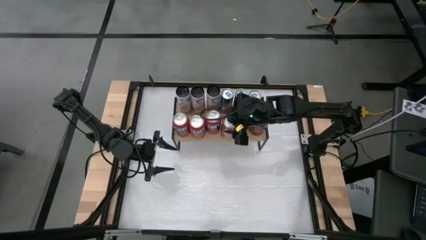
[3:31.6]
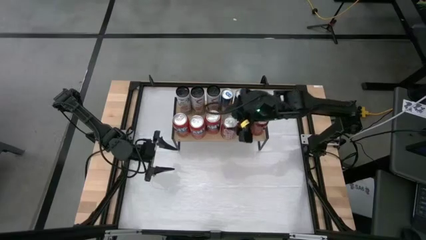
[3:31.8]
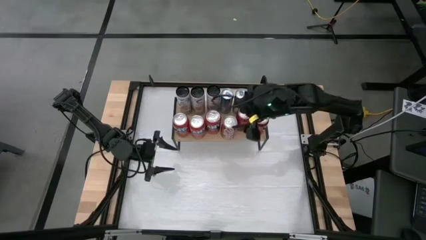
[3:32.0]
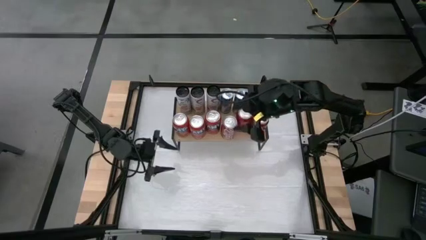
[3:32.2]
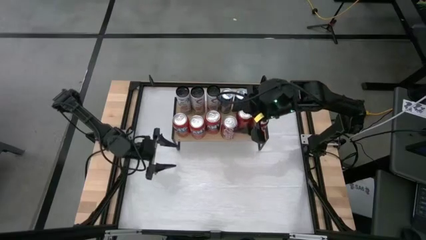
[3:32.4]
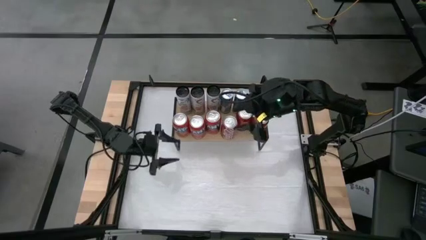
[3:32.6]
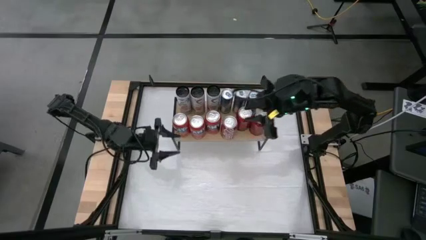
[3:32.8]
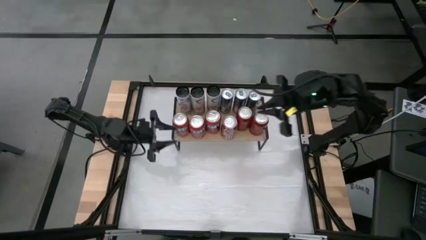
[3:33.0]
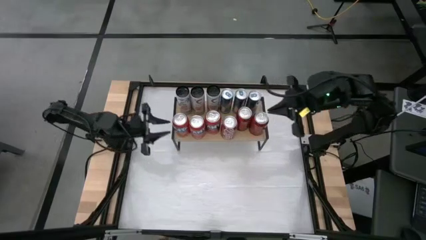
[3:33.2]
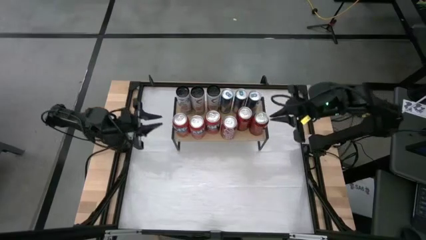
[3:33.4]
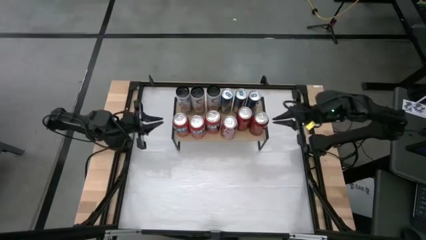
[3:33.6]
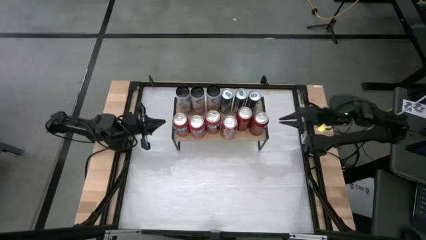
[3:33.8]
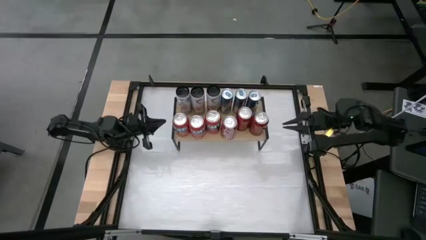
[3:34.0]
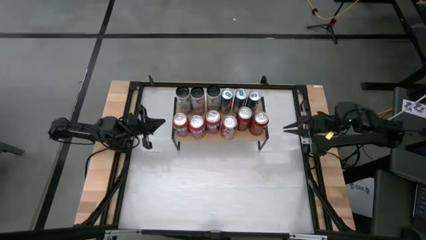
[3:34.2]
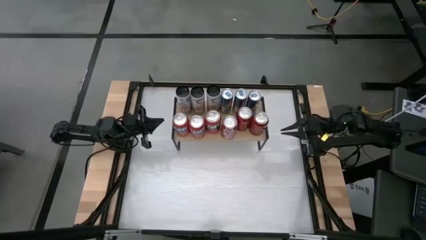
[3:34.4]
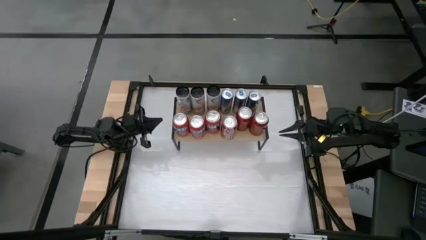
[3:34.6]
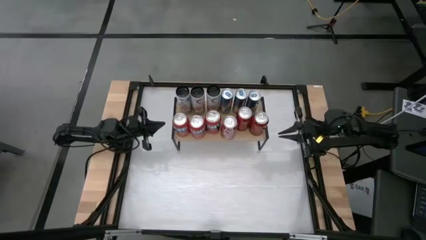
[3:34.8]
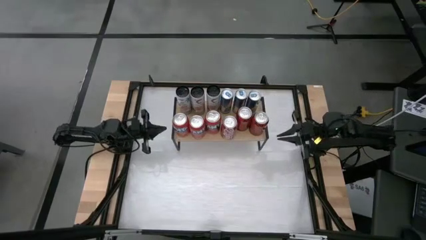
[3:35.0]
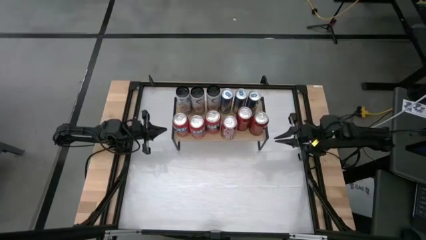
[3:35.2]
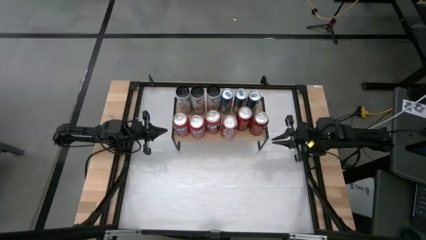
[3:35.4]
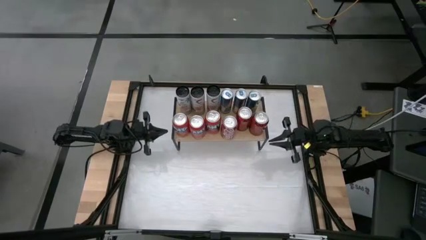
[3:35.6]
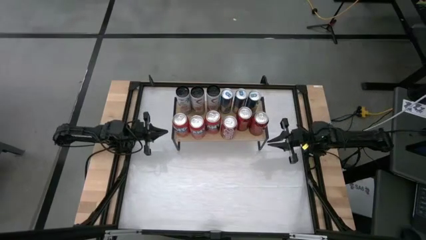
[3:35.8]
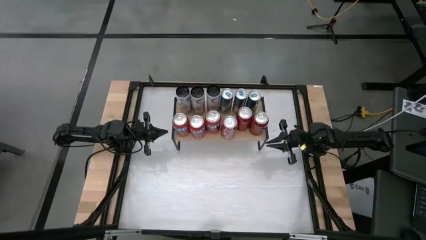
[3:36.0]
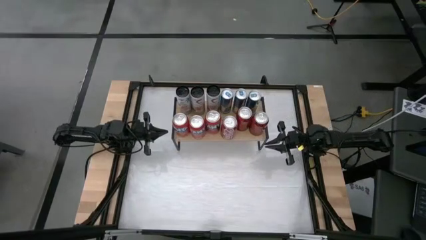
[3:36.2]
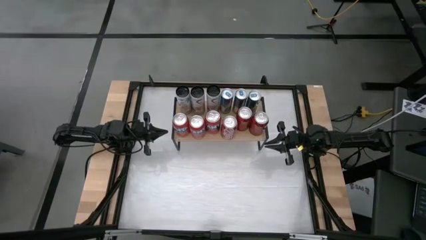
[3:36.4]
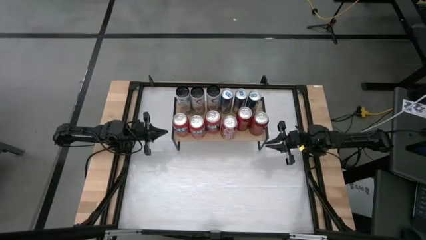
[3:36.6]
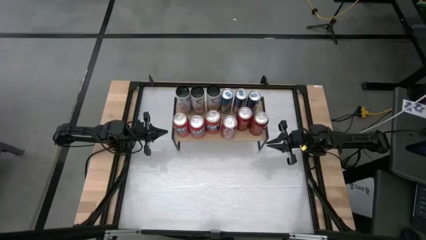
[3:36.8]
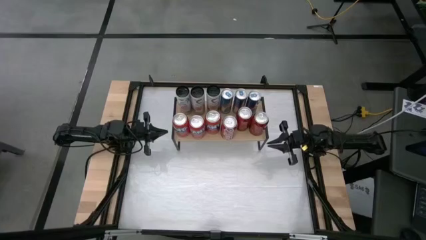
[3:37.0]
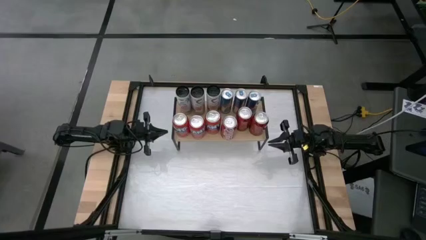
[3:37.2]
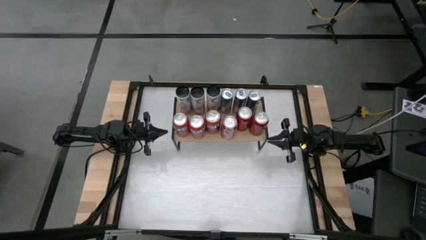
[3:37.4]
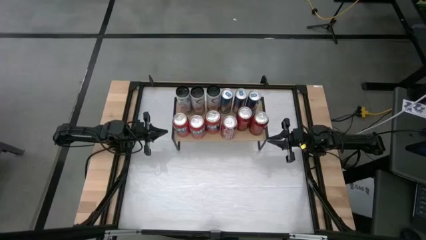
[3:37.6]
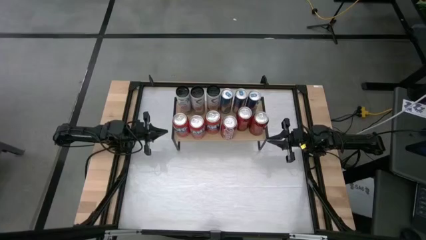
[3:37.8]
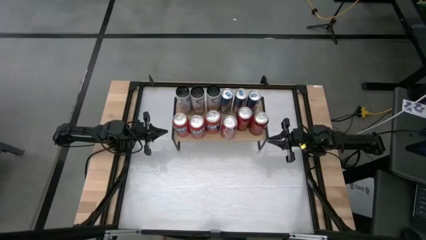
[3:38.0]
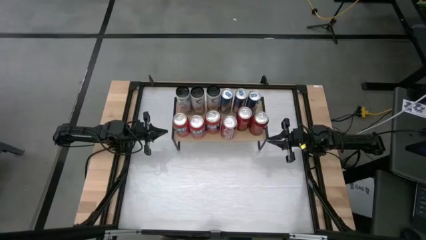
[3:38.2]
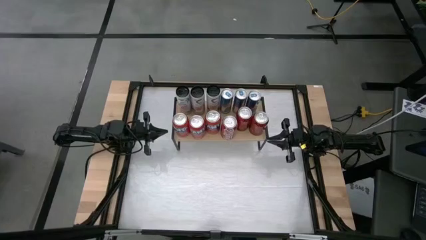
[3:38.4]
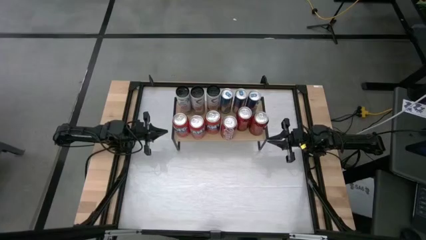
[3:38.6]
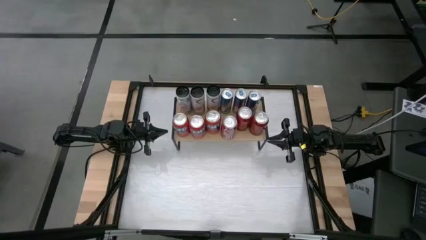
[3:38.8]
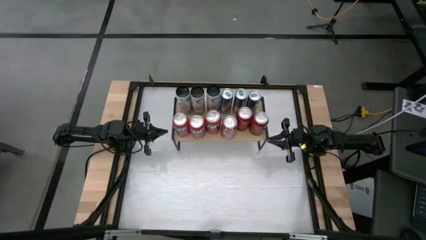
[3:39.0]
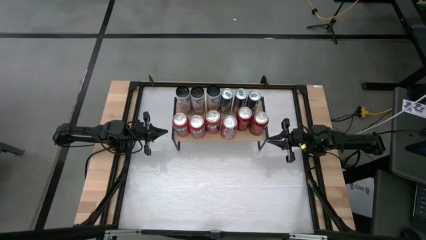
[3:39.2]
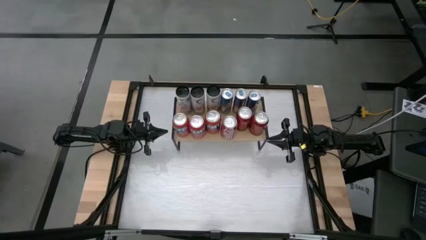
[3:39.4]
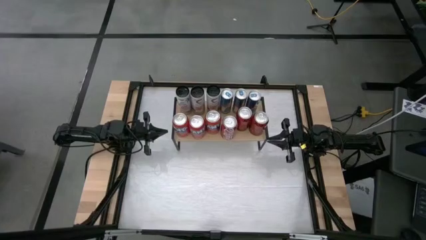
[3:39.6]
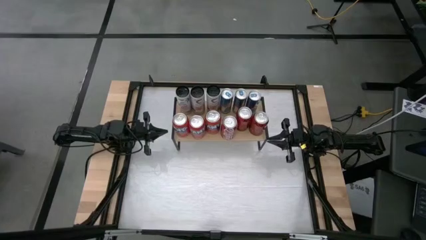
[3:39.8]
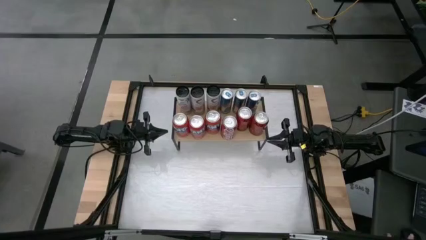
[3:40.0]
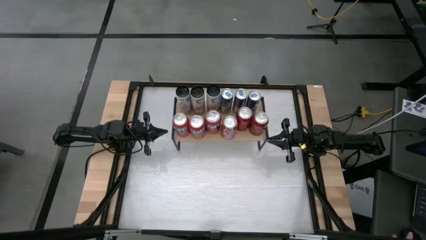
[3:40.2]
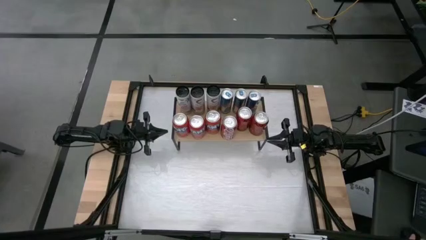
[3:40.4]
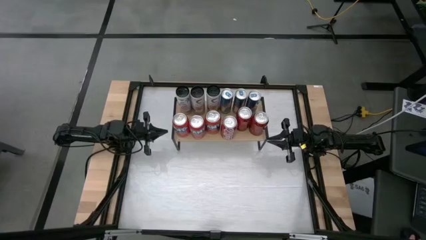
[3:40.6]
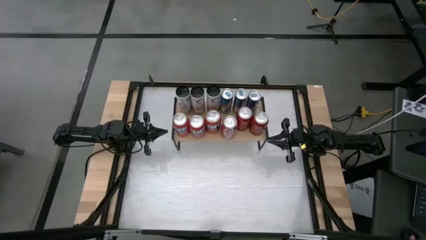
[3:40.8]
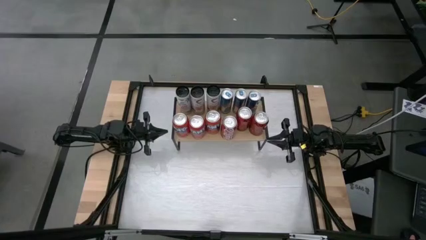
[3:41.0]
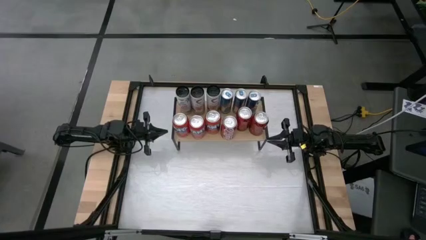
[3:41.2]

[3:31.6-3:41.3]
Task: Place canned beverage on shelf
Return to Home Position

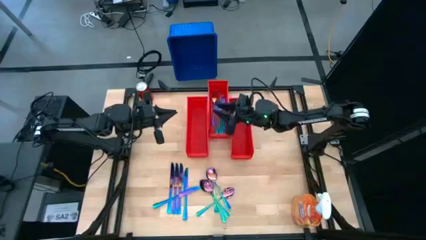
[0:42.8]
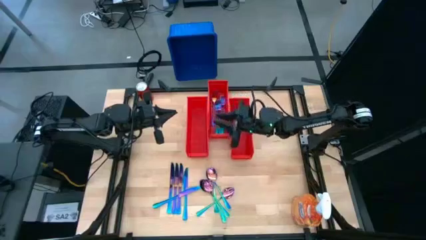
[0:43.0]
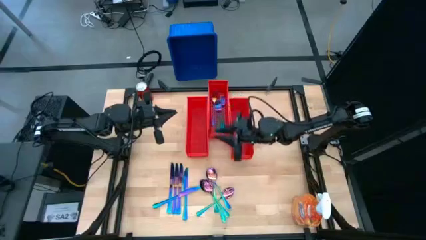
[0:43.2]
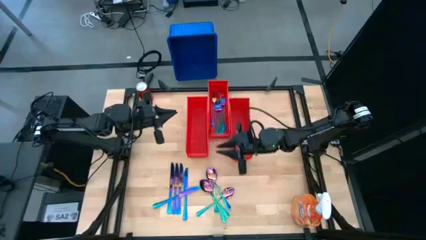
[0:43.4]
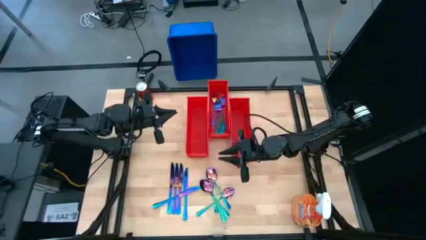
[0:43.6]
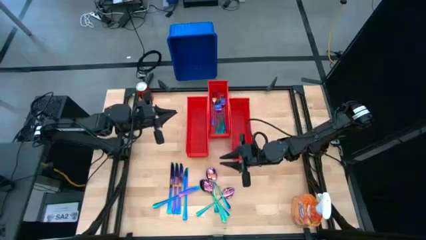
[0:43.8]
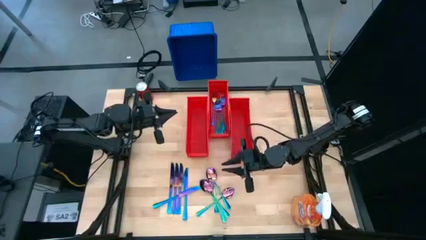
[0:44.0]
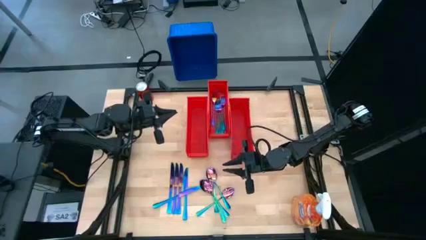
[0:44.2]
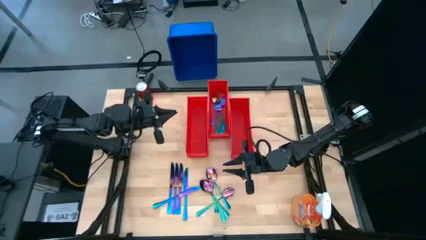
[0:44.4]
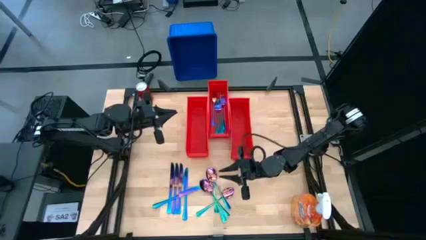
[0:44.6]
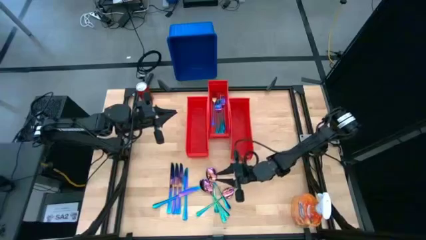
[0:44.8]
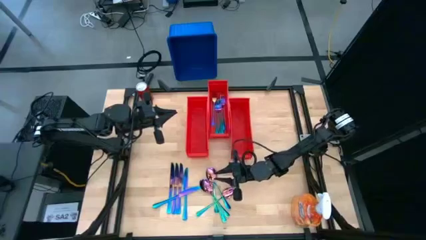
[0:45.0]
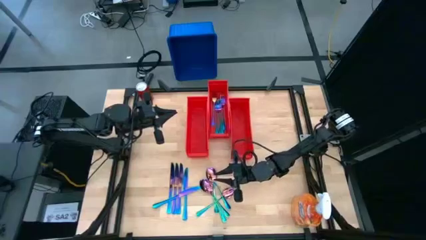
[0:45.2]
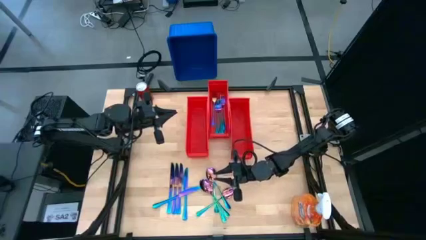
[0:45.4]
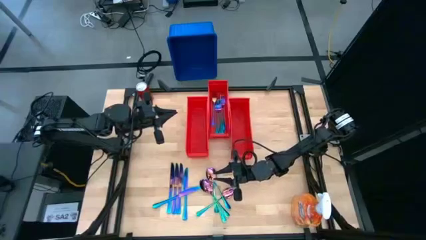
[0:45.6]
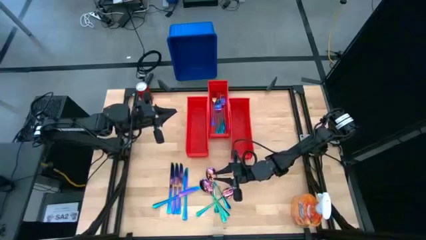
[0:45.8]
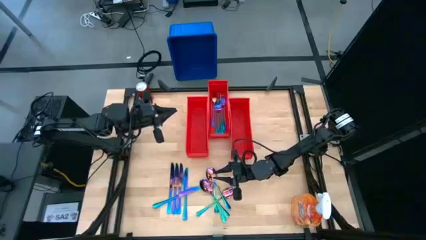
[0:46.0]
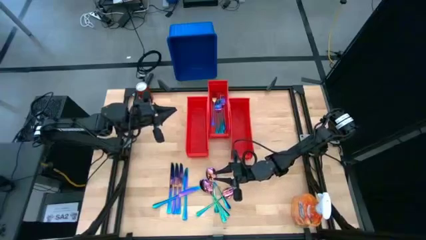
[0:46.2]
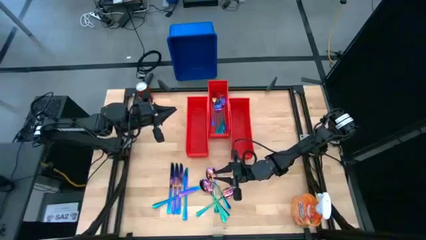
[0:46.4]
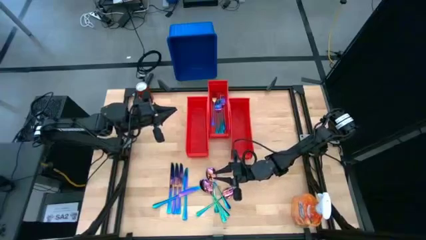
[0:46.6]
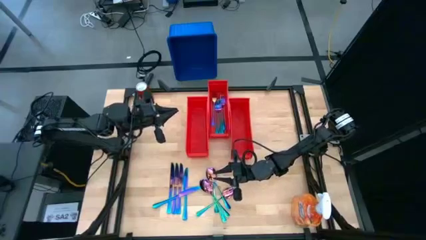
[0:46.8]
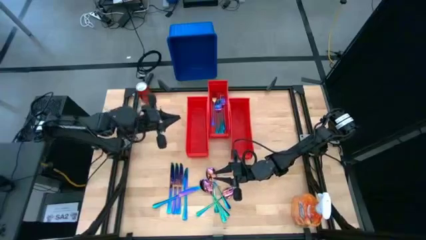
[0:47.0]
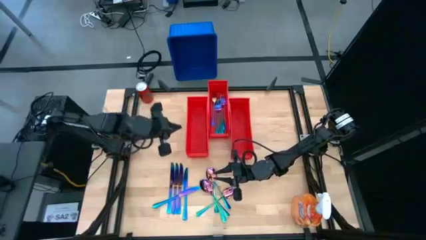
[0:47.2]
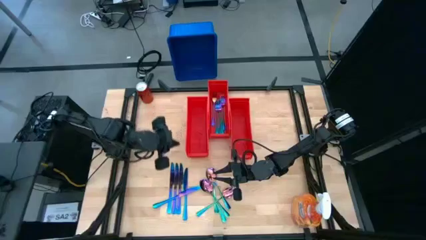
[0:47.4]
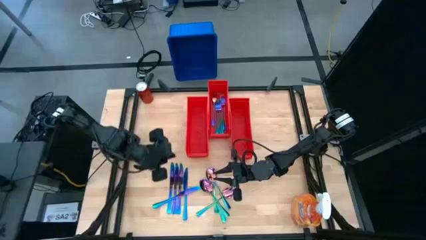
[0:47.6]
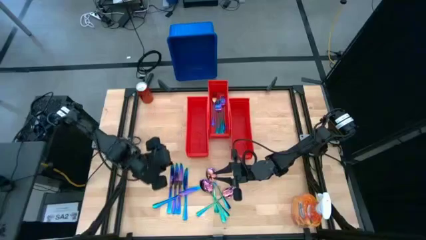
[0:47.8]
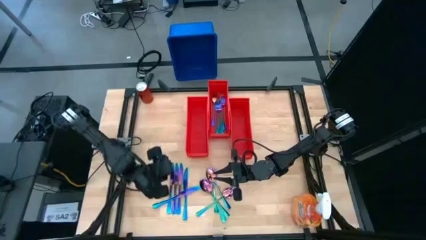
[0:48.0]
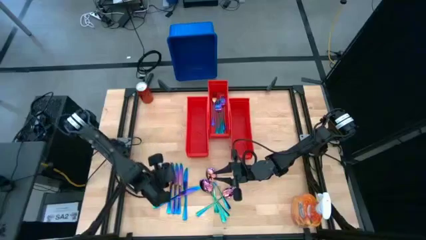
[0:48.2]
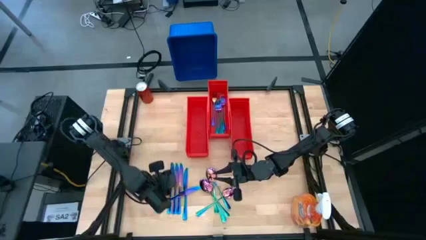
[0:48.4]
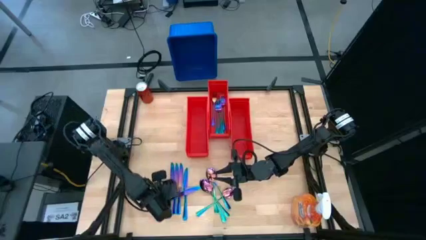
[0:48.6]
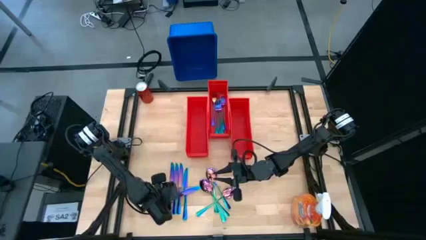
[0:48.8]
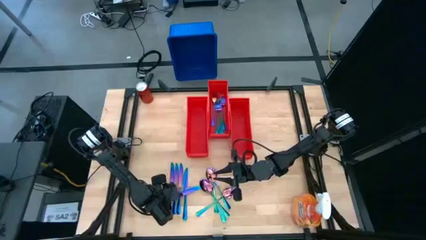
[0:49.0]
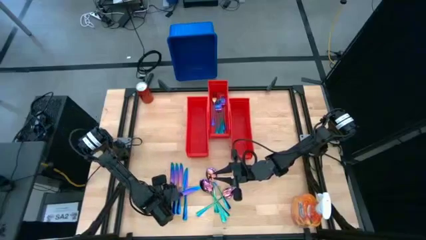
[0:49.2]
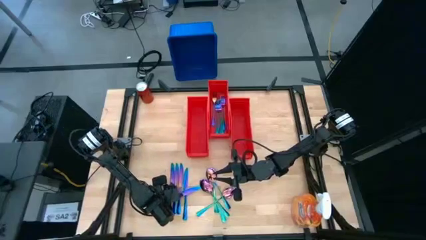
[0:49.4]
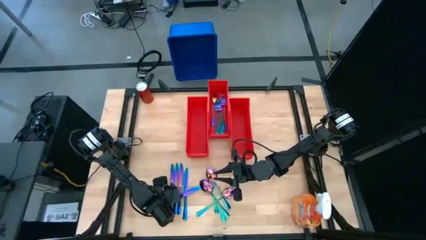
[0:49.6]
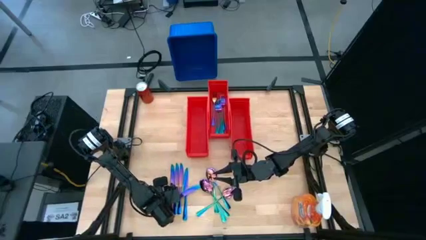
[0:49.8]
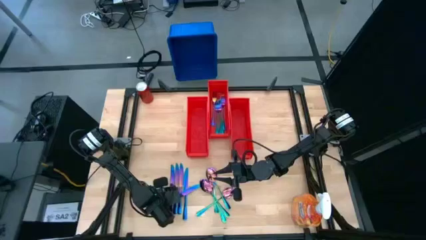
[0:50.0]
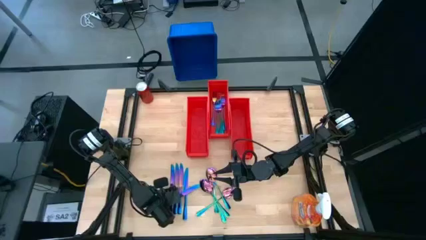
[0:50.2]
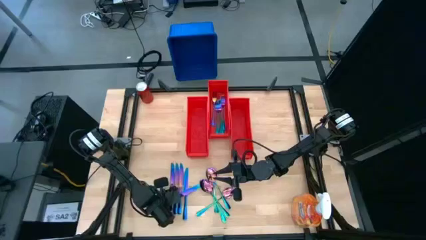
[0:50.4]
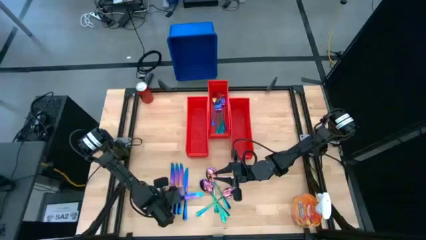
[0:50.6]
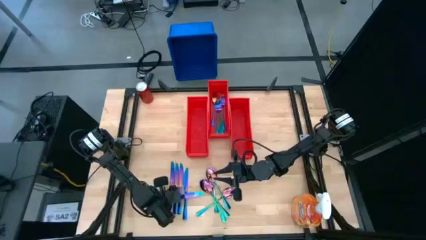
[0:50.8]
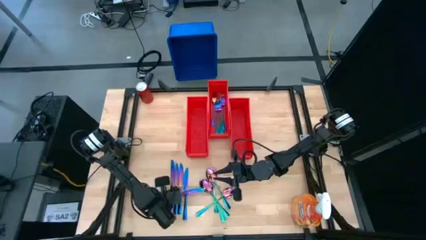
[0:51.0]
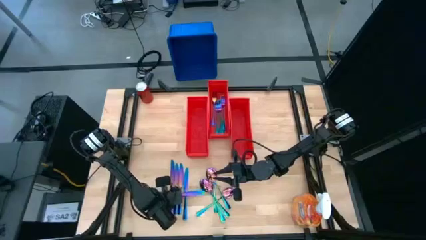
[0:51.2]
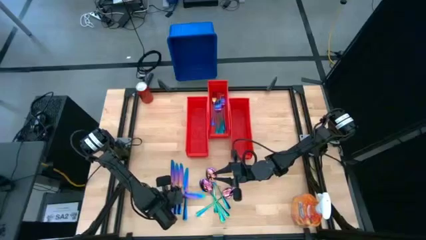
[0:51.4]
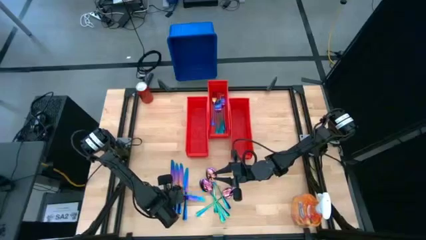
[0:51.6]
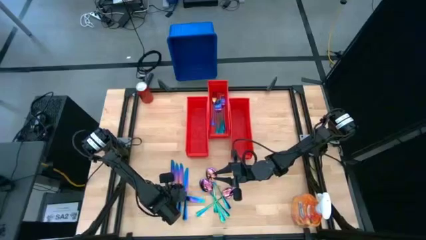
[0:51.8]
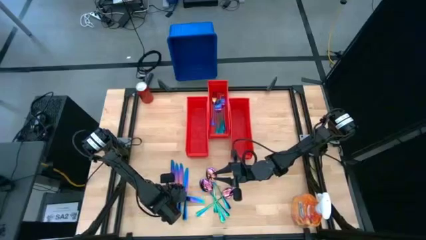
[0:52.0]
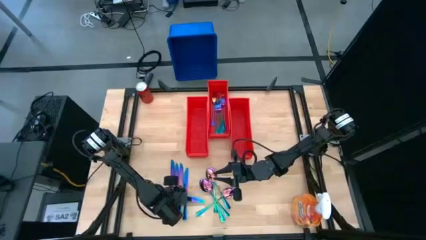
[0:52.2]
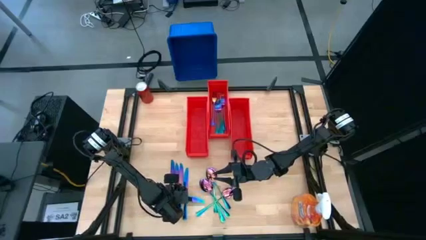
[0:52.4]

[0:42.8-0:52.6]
Task: Sort silverware
Put the iridescent knife into the right orange bin
